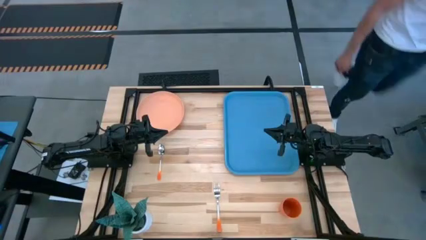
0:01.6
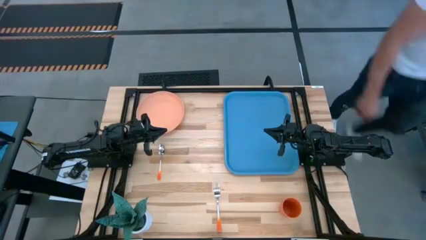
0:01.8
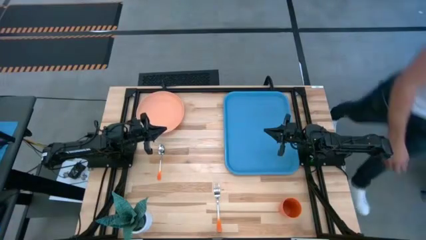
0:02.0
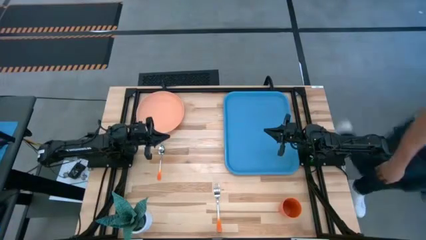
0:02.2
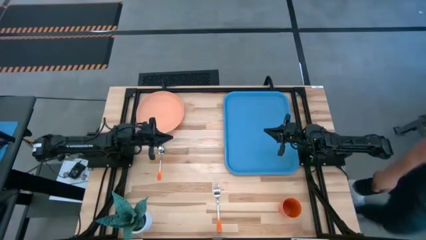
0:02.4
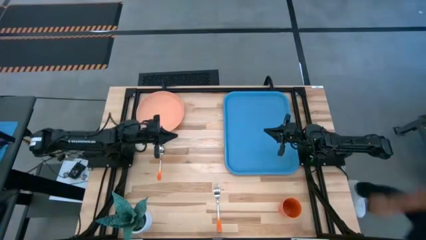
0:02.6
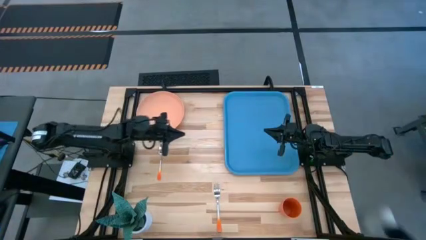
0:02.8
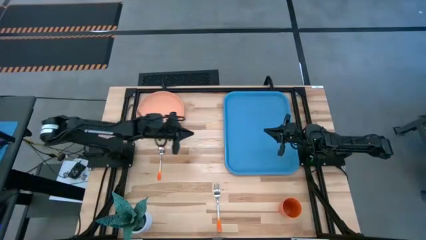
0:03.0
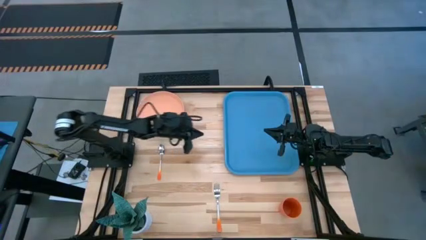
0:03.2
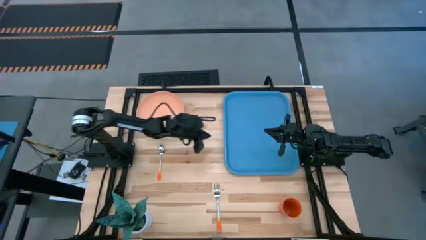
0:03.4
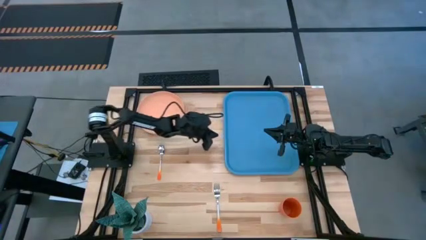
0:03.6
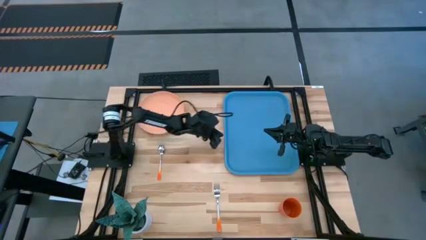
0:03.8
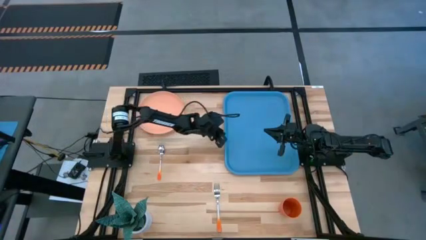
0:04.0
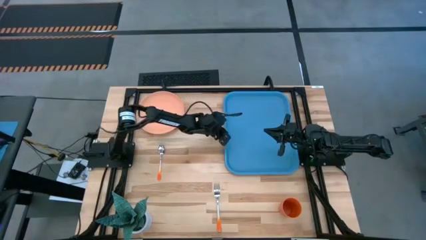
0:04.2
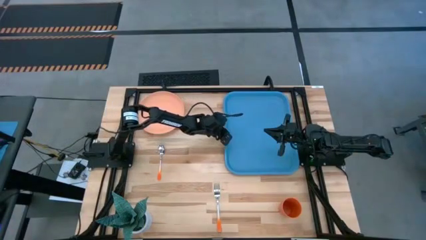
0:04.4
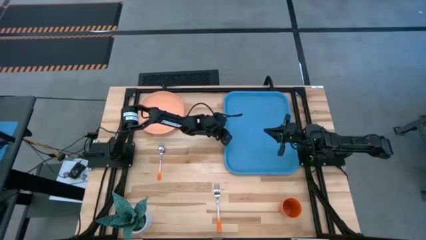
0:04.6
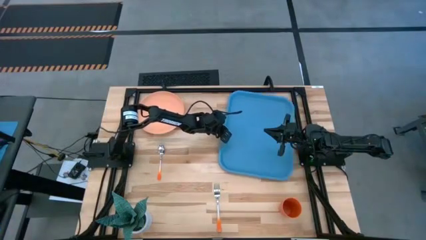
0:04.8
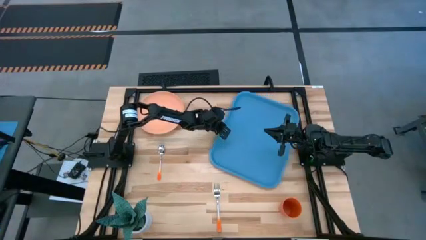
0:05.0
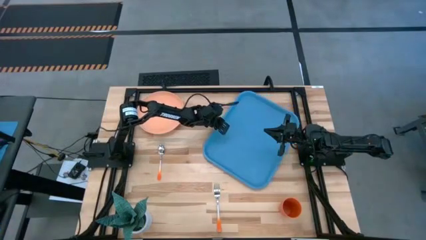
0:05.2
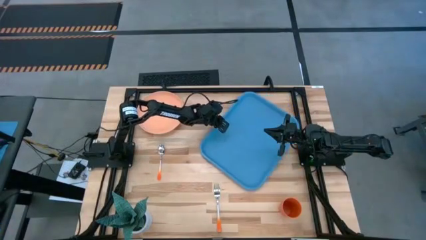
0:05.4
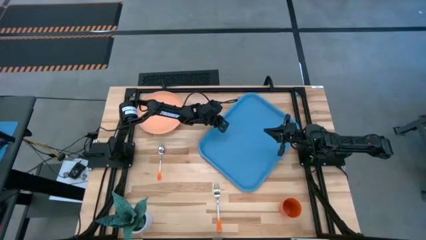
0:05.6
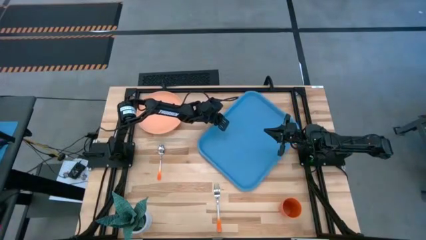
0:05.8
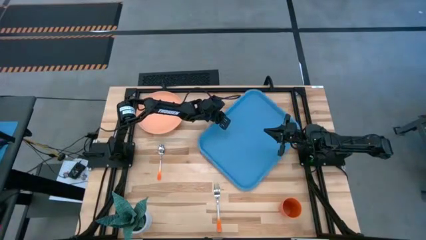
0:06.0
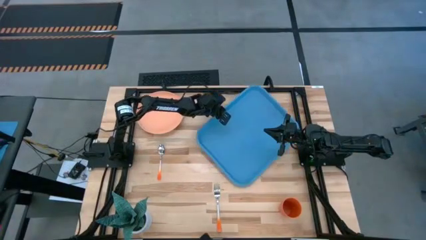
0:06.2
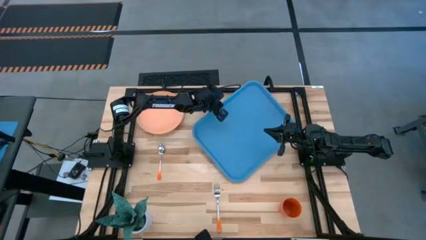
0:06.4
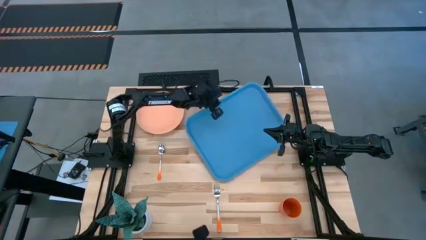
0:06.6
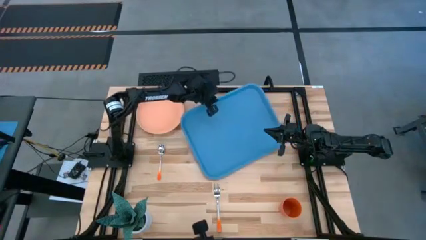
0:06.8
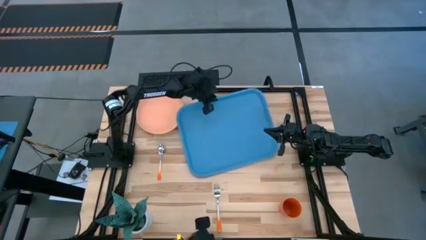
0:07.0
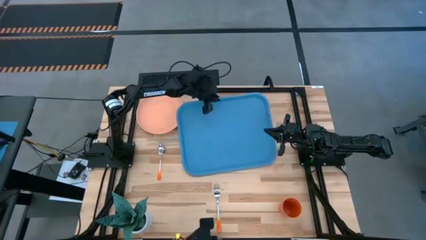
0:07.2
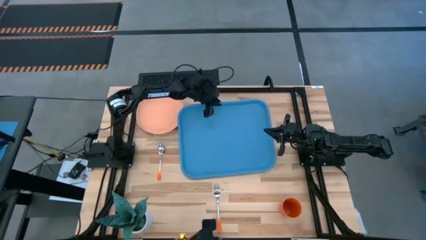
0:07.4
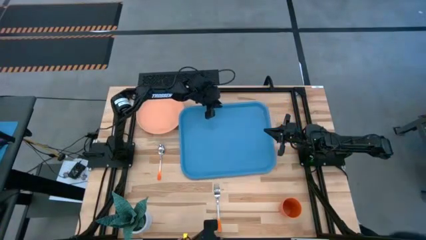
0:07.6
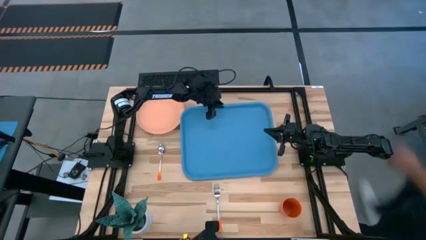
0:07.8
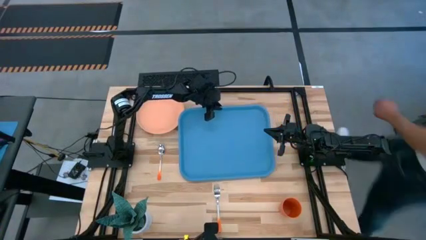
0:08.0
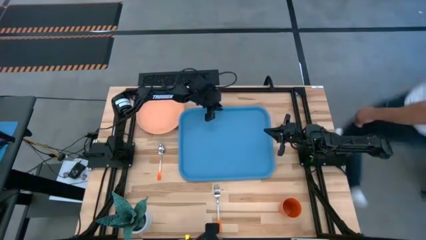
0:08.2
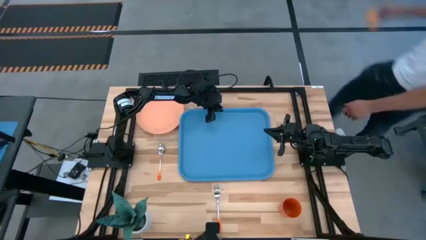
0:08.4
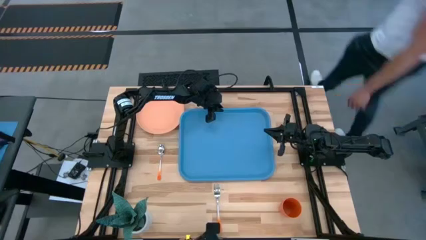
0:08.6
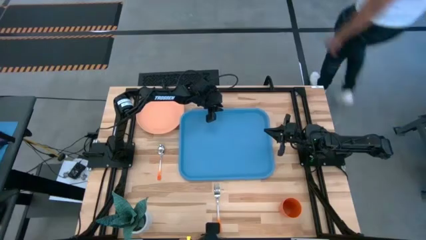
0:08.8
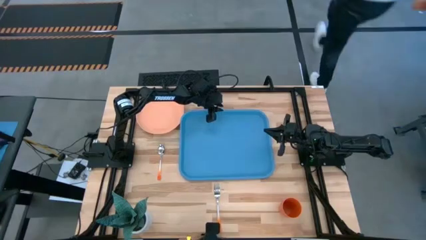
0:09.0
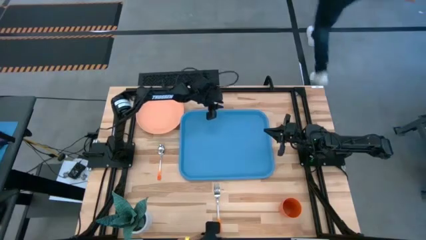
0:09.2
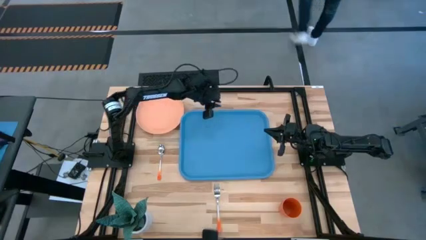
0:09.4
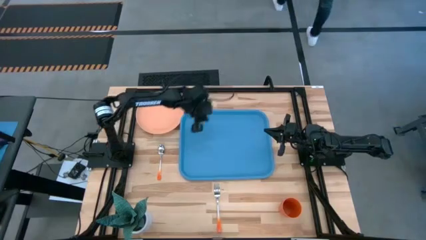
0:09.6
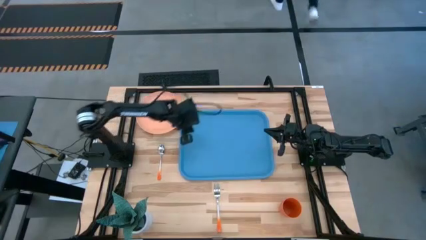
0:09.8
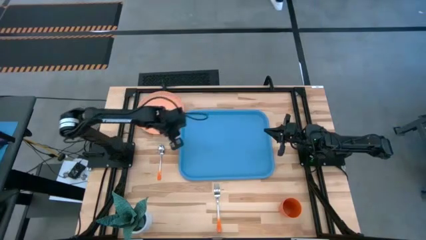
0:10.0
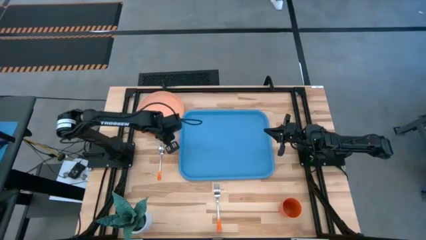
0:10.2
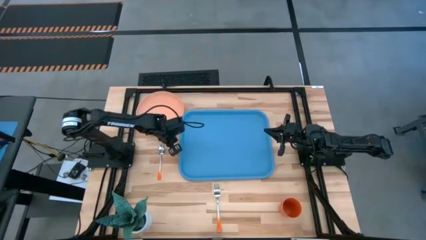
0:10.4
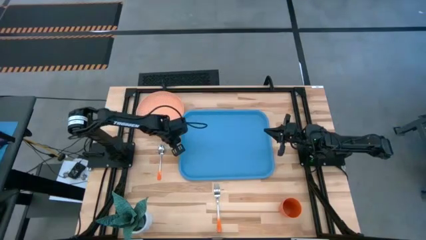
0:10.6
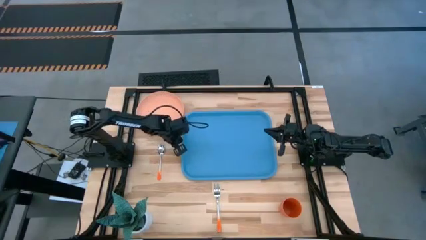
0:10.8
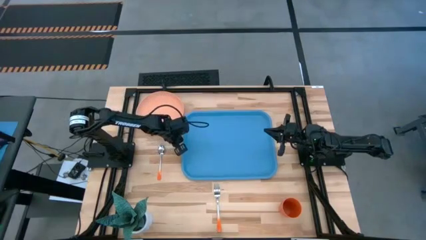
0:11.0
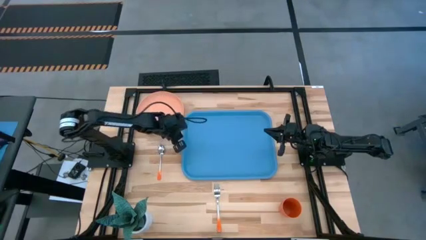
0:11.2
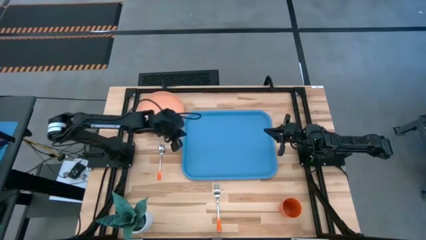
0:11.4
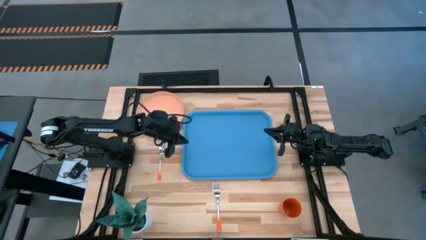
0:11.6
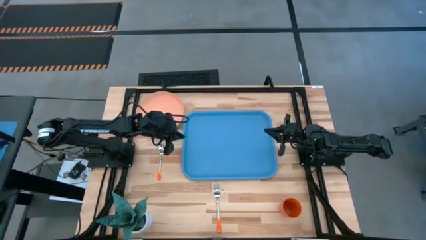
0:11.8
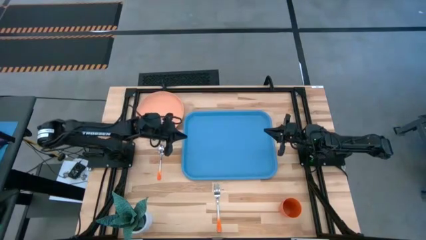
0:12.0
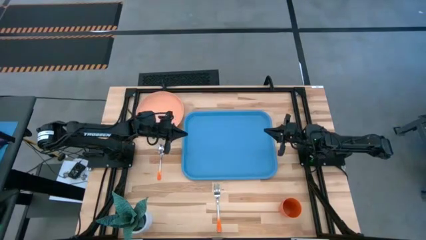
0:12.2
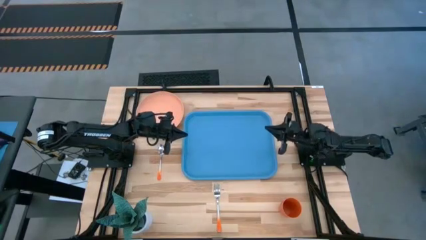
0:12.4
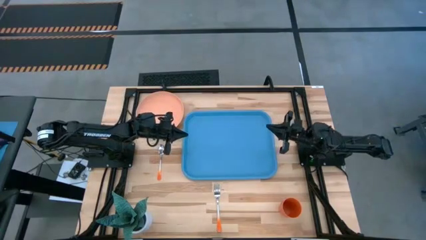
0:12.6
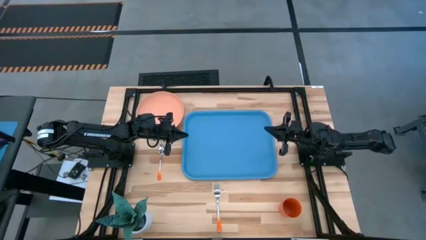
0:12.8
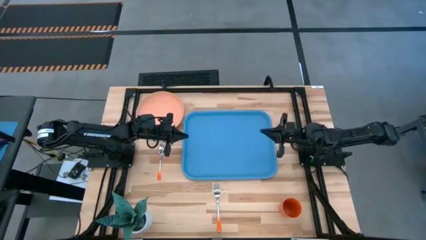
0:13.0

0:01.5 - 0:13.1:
Task: Pick and place plate/cup/fork/spoon on tray
Move the blue tray from top right to the middle of the table

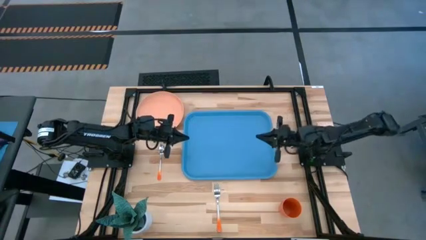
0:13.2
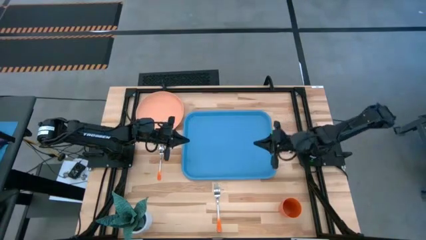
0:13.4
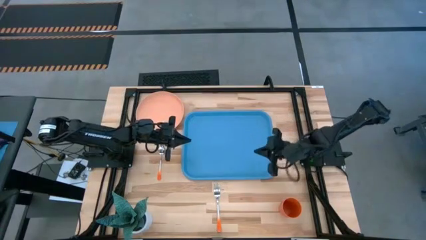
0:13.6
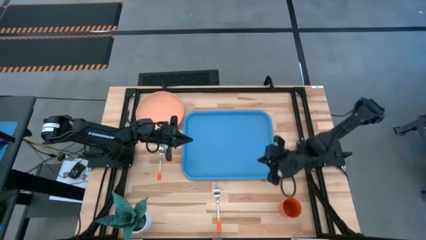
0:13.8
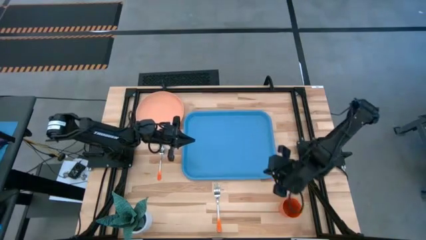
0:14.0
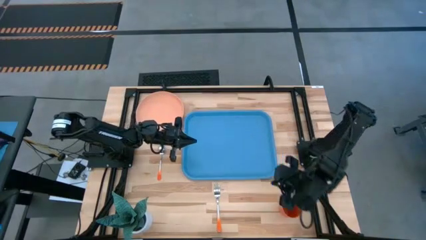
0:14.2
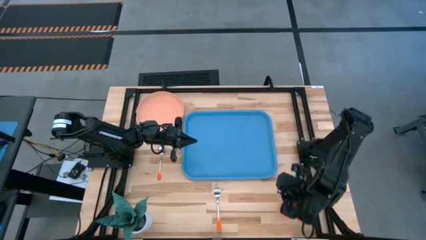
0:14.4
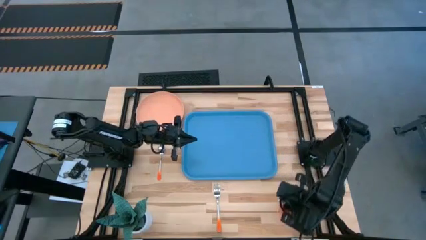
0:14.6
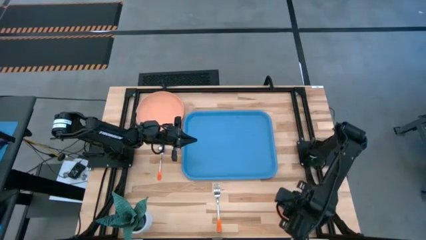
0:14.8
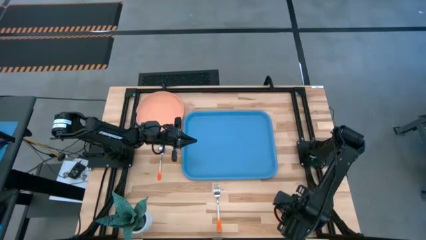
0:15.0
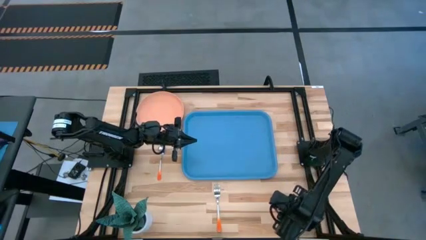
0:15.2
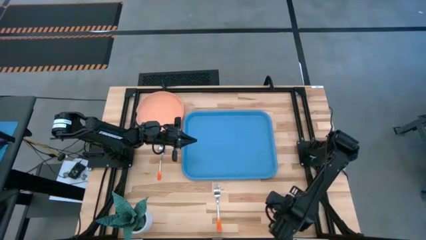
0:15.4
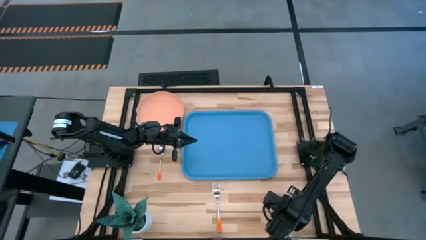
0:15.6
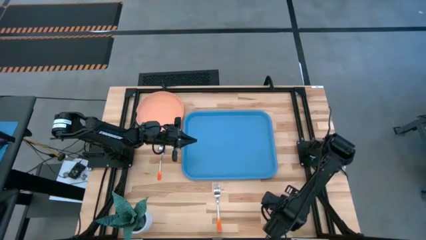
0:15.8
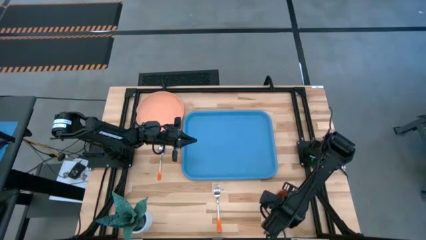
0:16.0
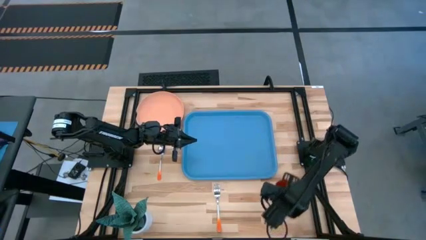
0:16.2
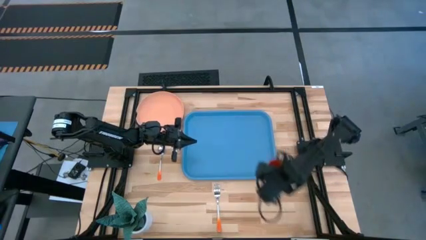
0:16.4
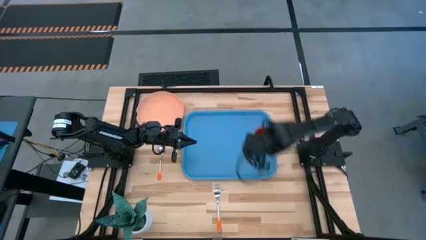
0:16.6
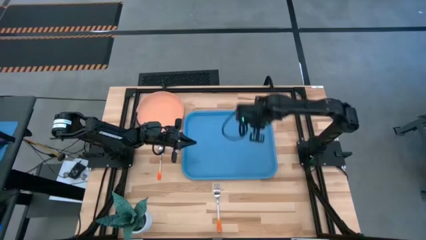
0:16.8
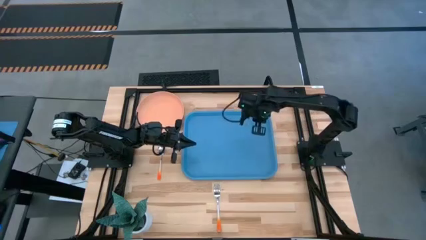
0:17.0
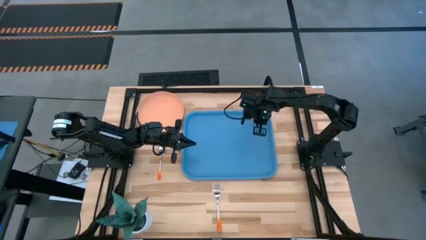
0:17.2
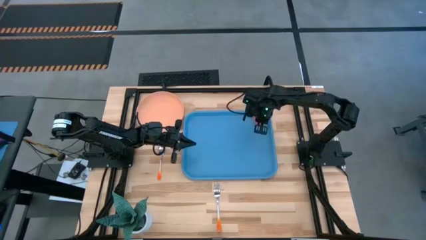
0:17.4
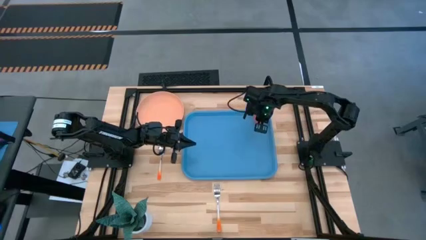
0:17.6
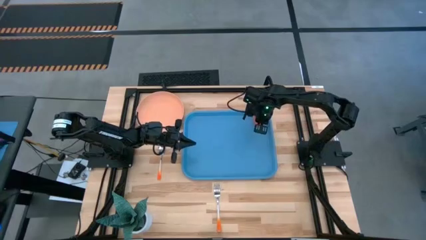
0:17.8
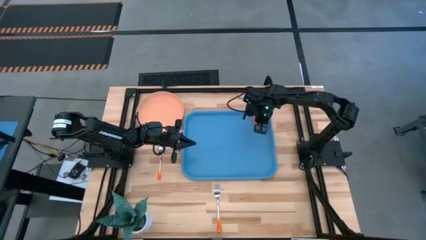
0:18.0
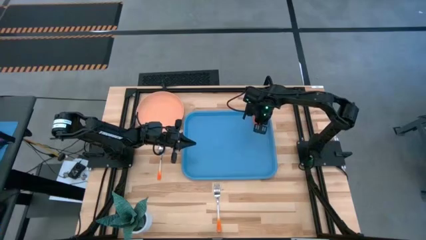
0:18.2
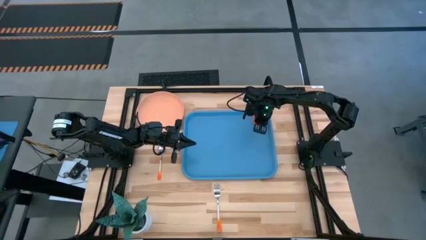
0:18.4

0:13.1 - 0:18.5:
Put the orange cup on the blue tray
